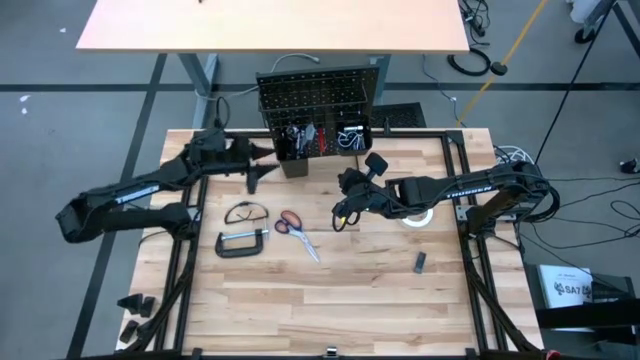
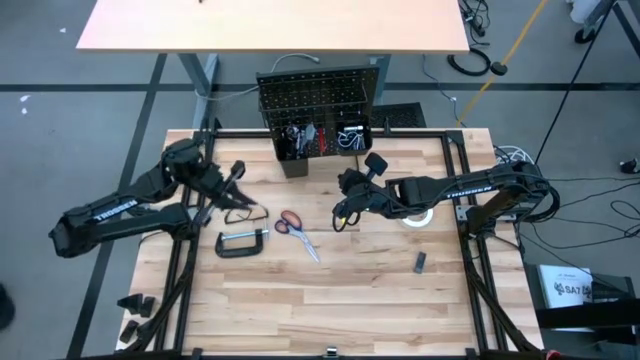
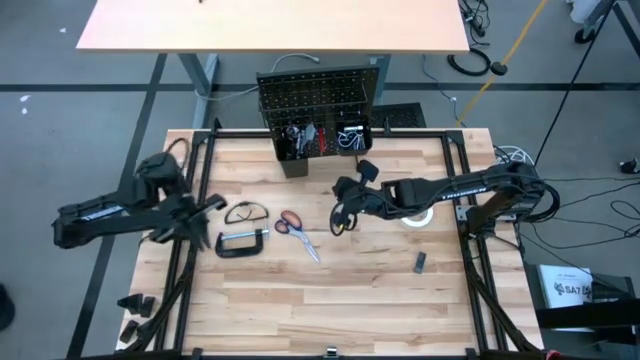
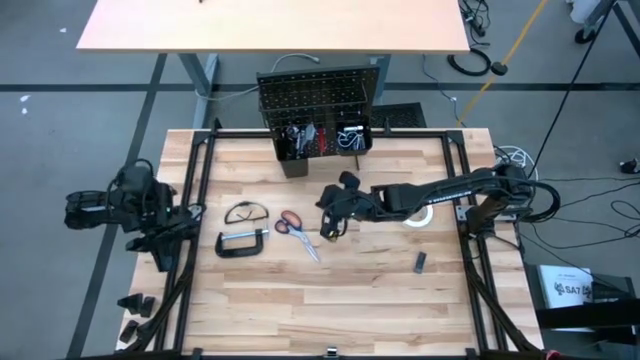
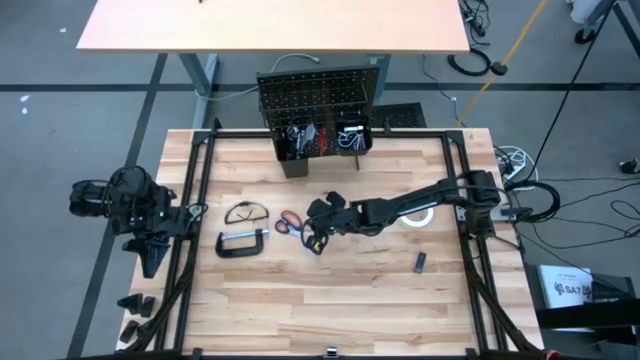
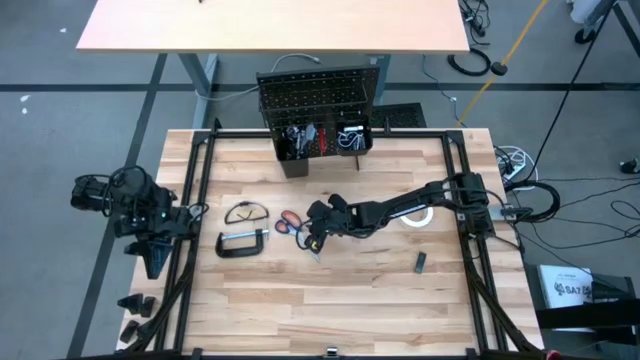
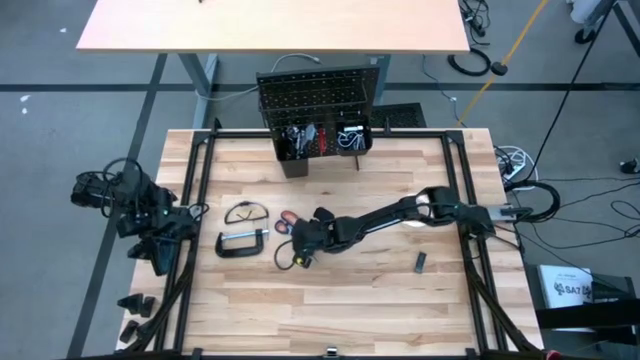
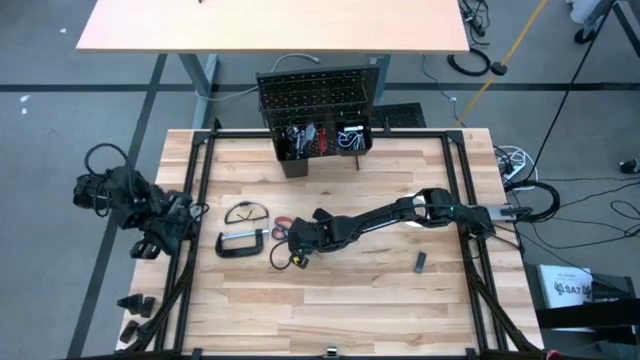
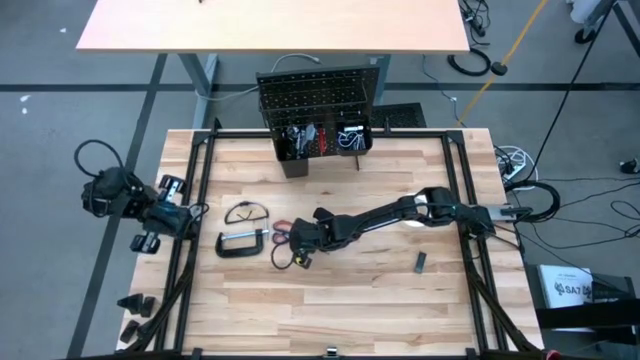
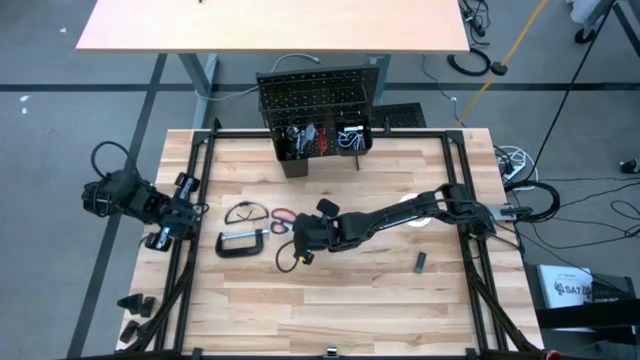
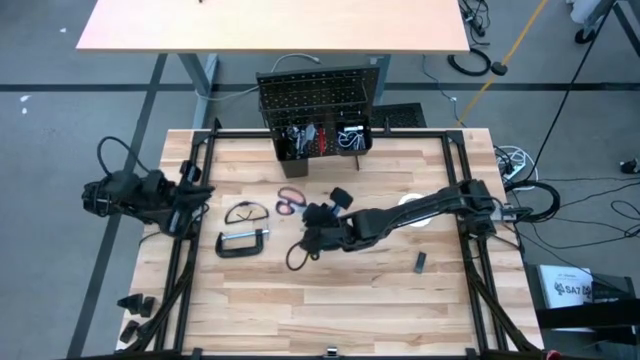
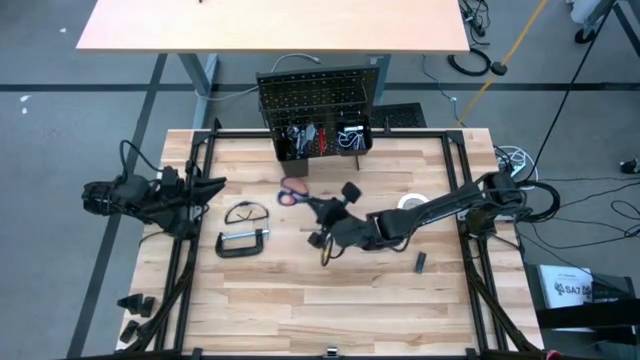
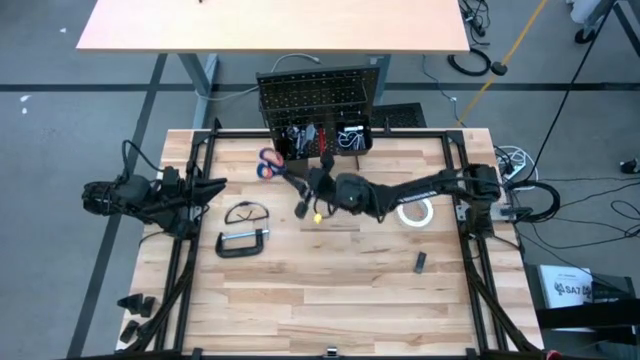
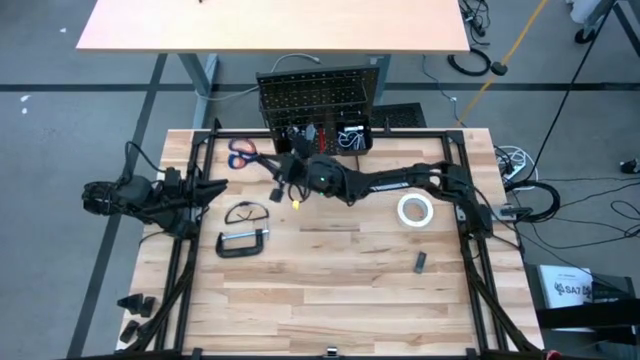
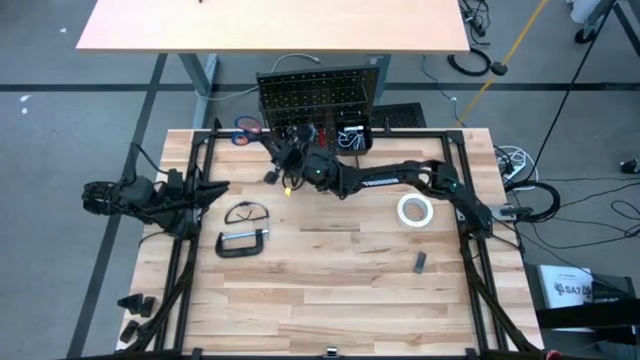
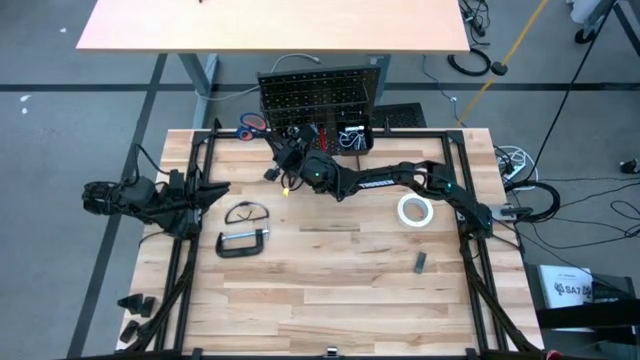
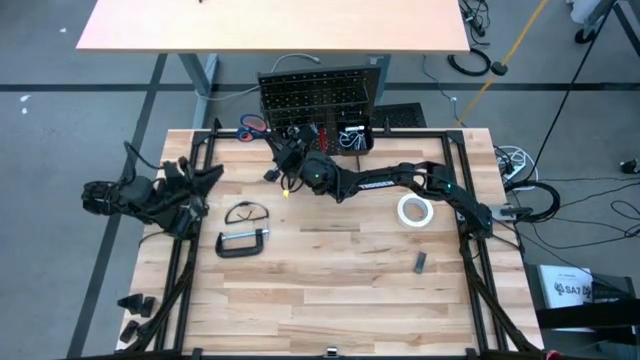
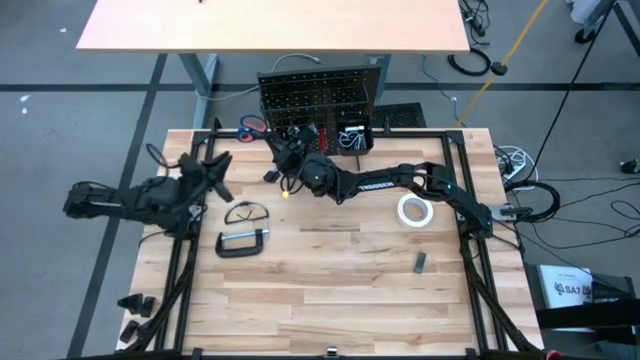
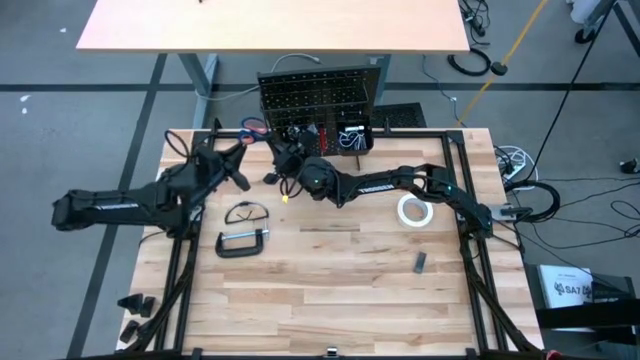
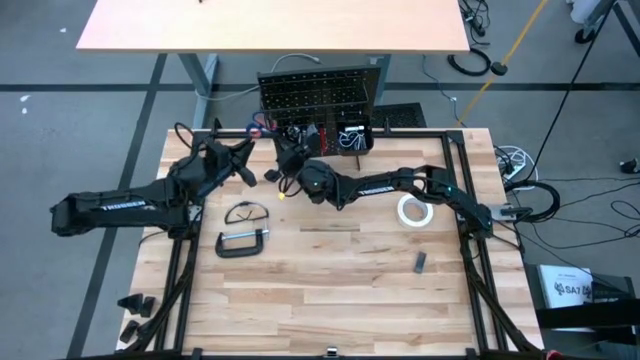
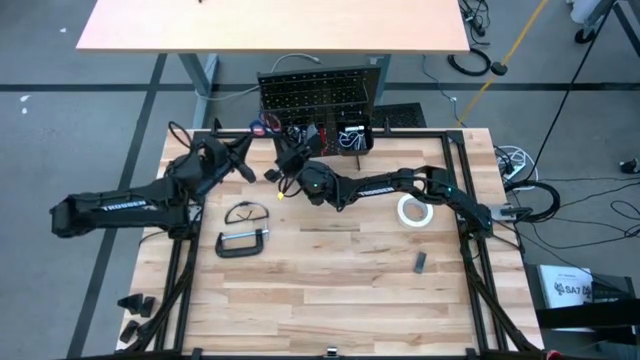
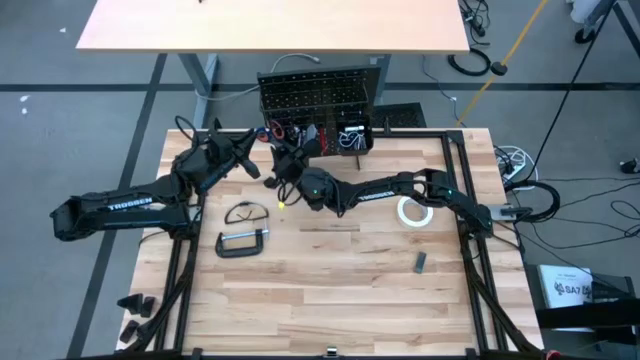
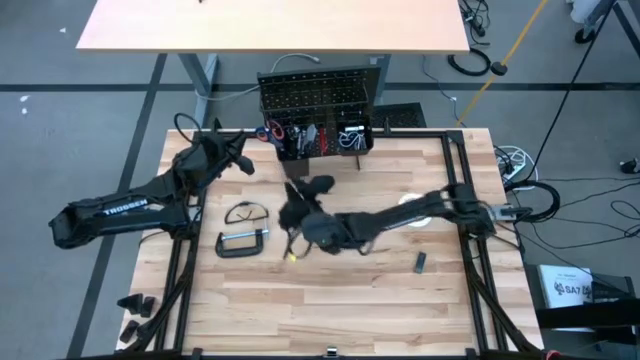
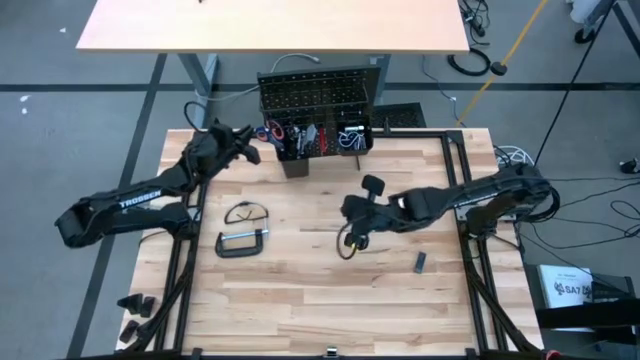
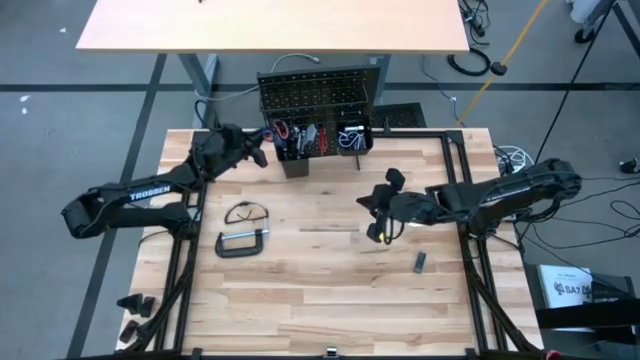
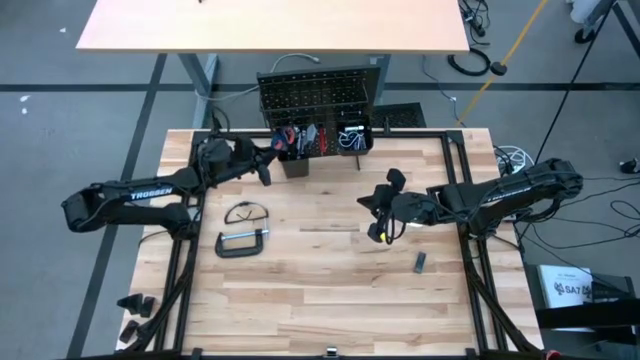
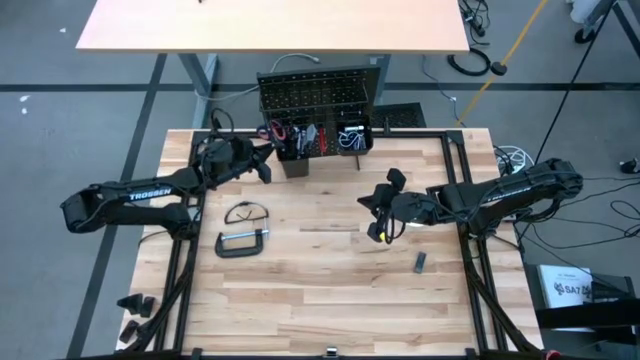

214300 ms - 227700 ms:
Task: Hang tools onto peg board
Put the scissors on the left black bin on the peg board

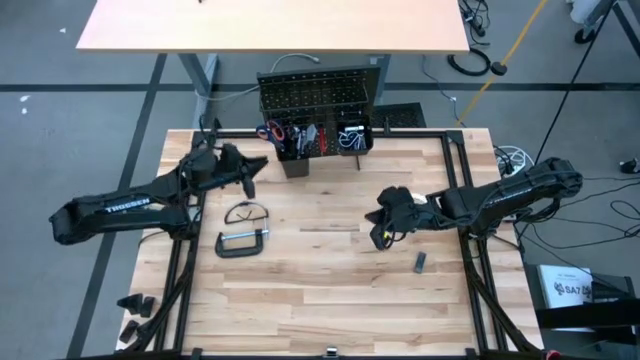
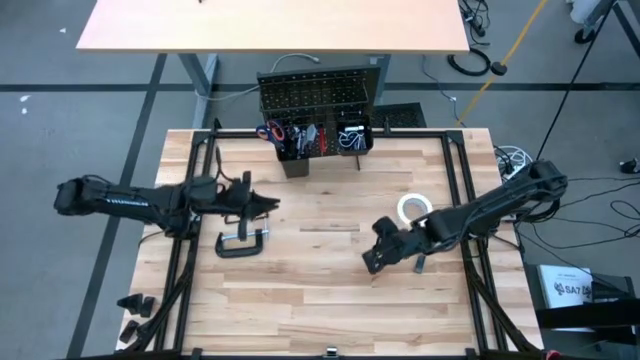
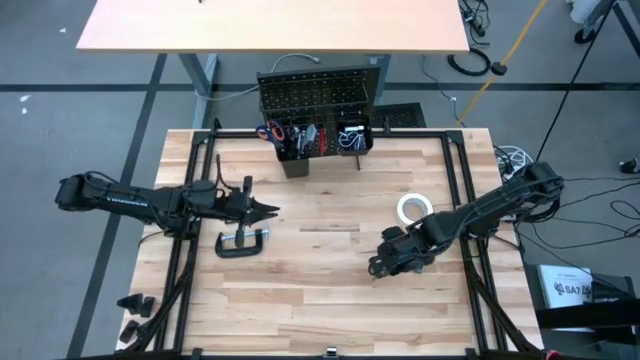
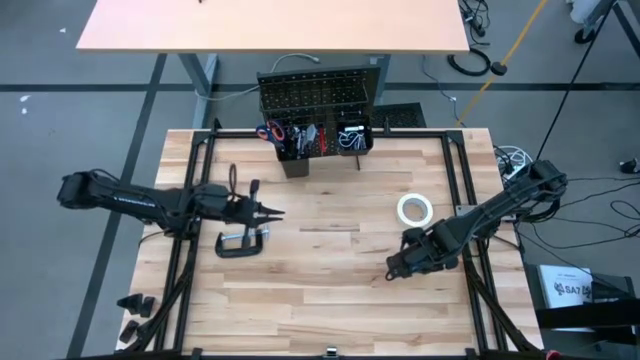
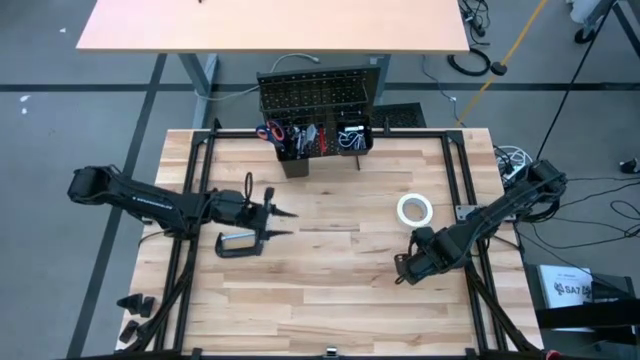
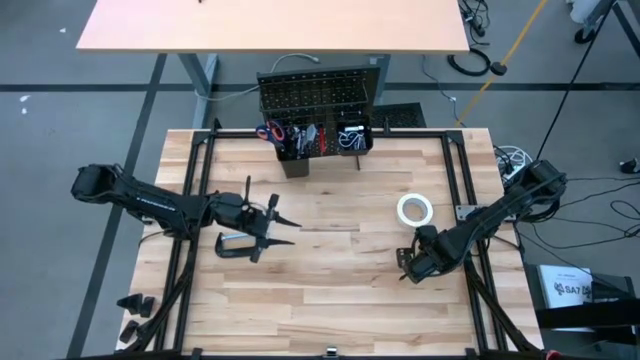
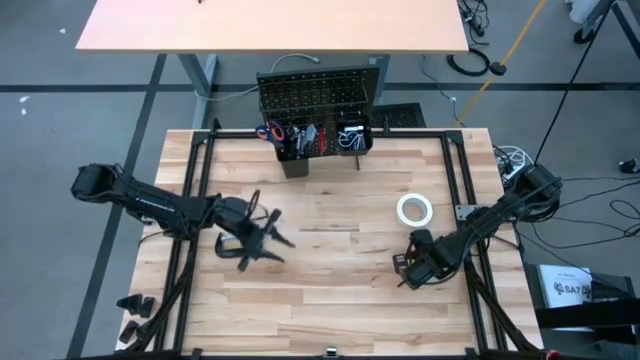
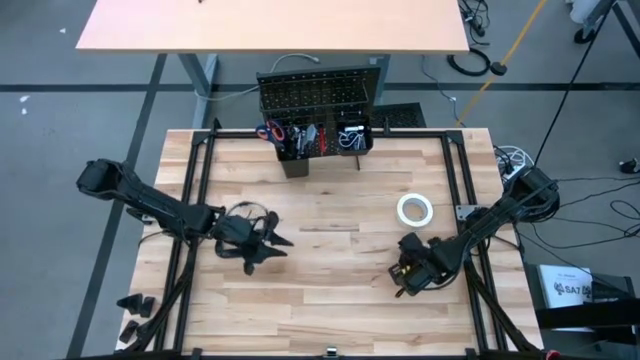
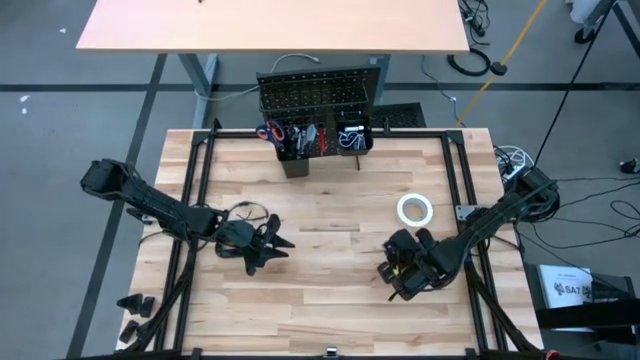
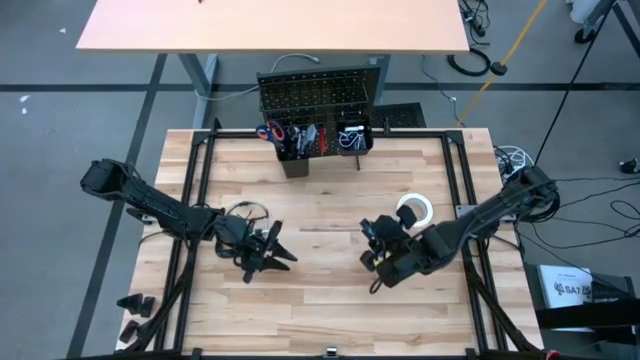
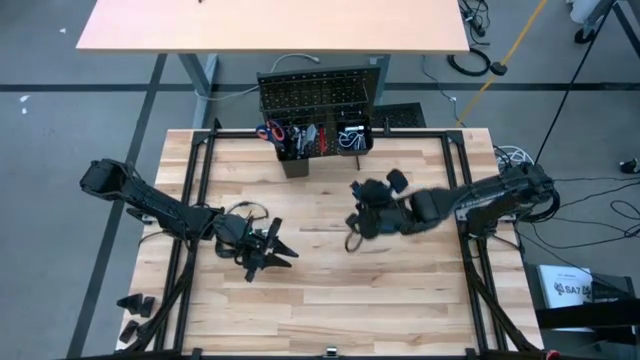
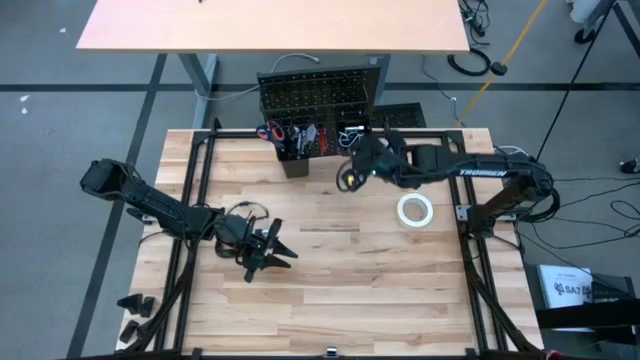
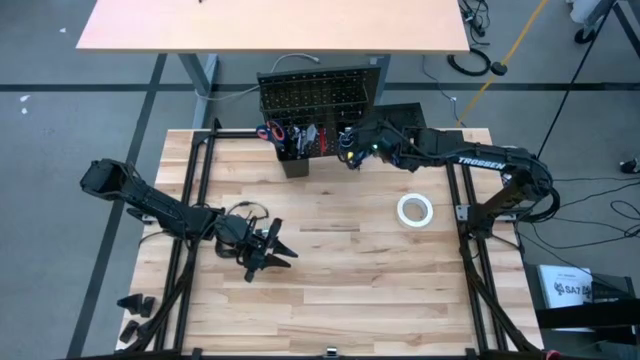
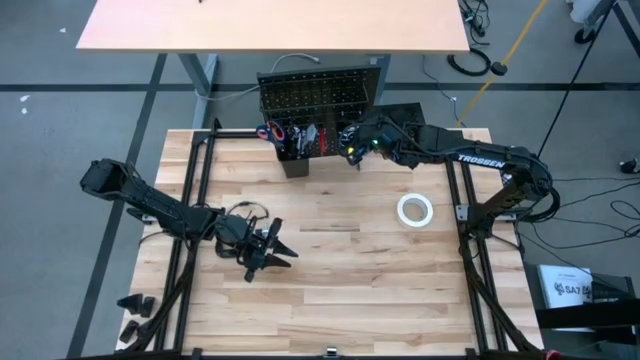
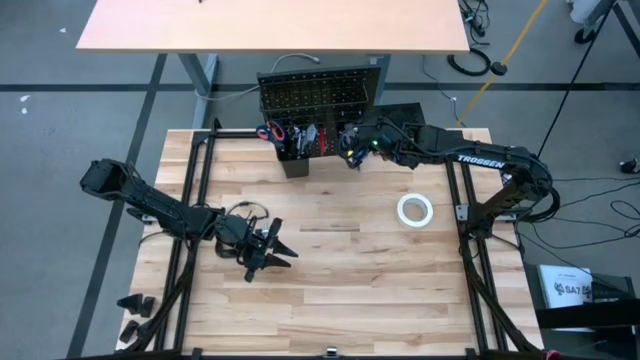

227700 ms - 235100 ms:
Put the object on the right black bin on the peg board

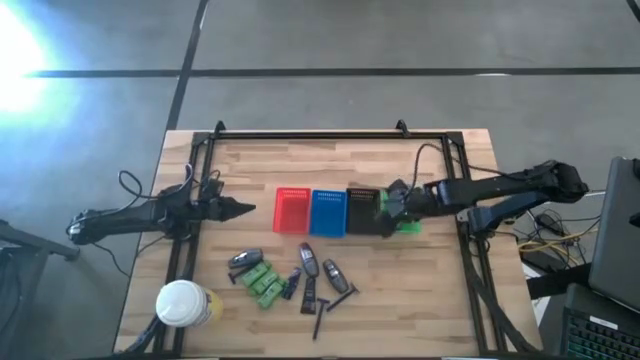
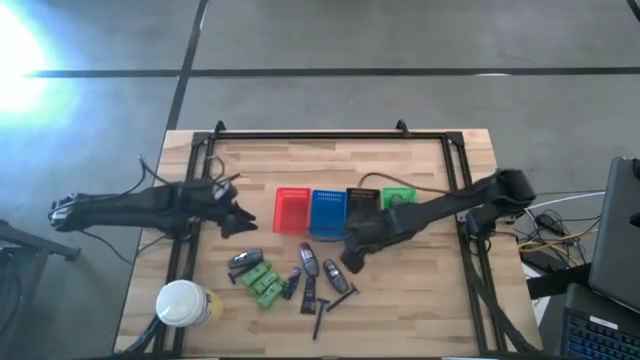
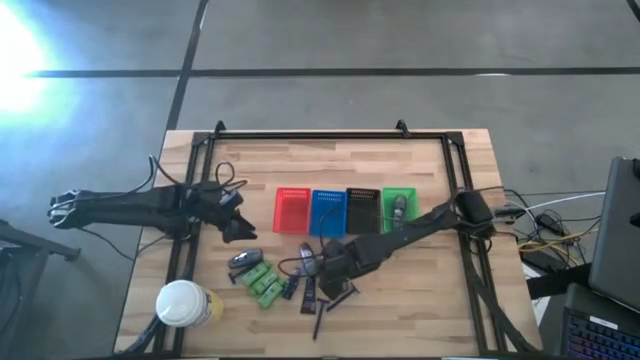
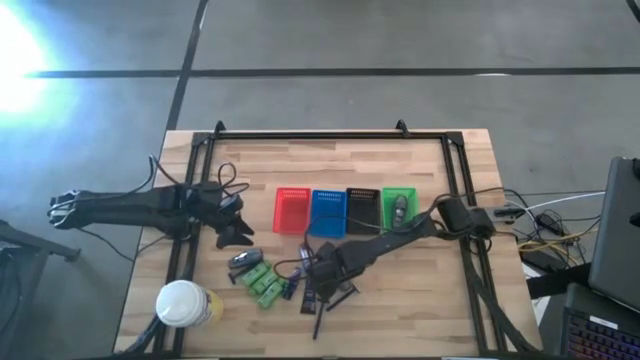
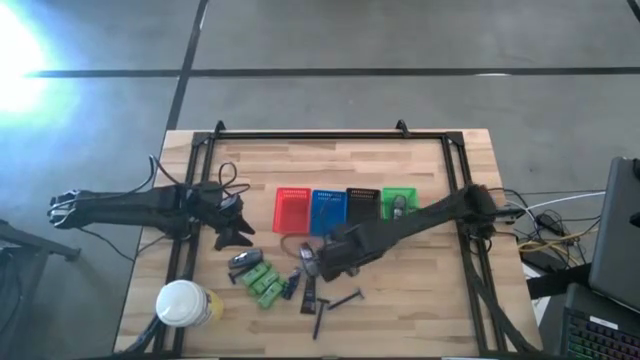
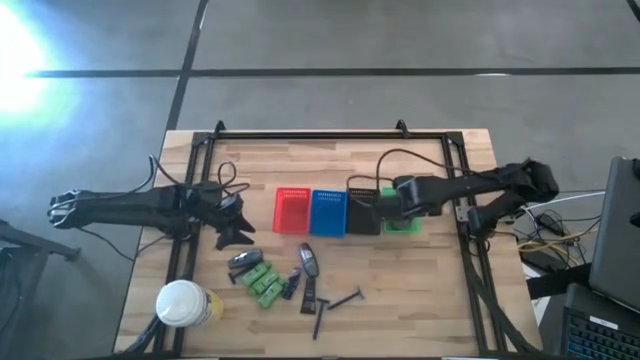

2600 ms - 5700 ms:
Task: Pick & Place Travel size toiletries
Put the black deodorant into the green bin
